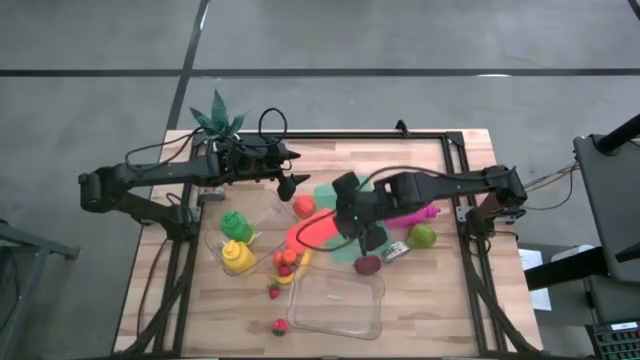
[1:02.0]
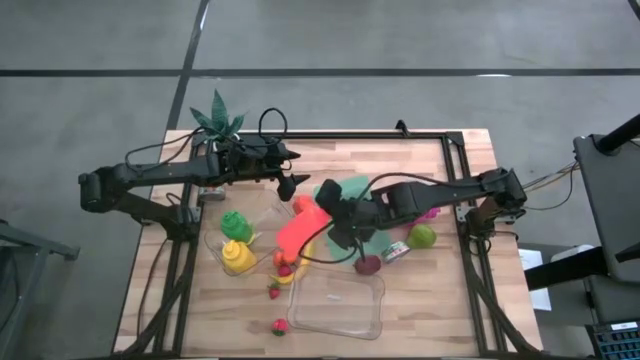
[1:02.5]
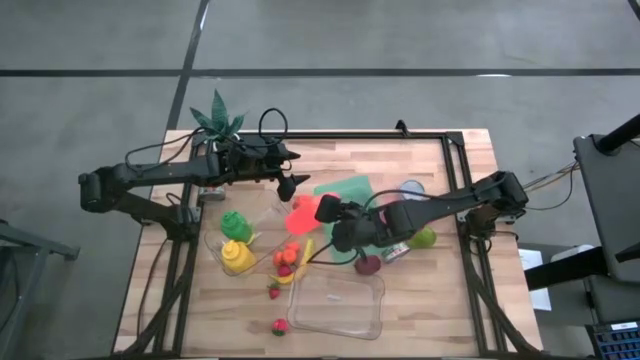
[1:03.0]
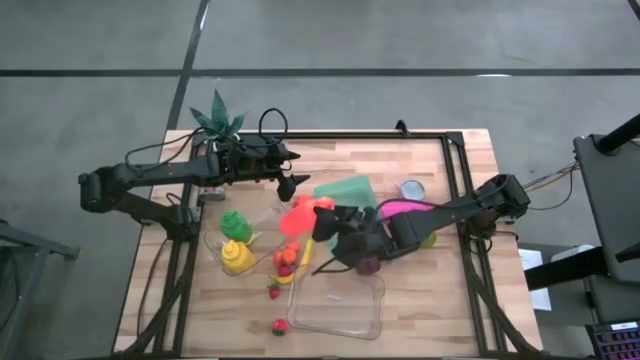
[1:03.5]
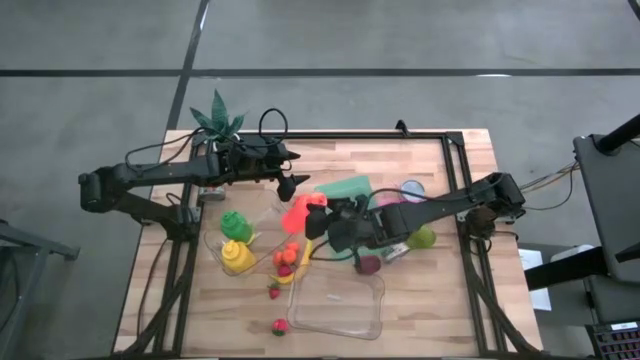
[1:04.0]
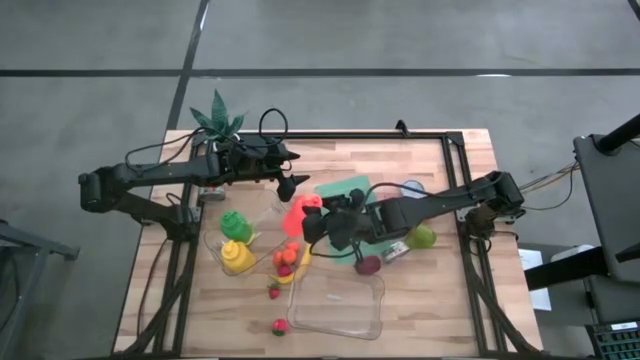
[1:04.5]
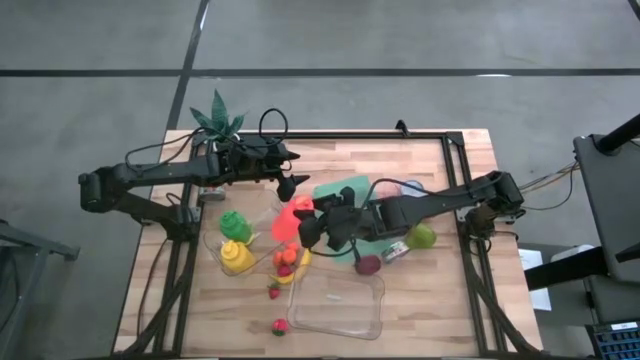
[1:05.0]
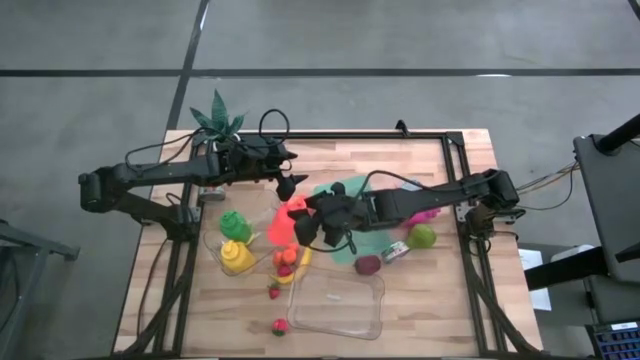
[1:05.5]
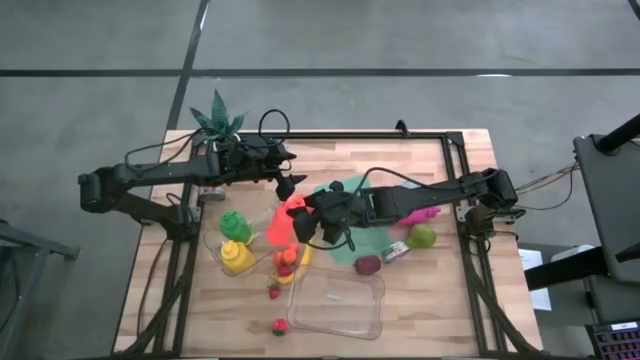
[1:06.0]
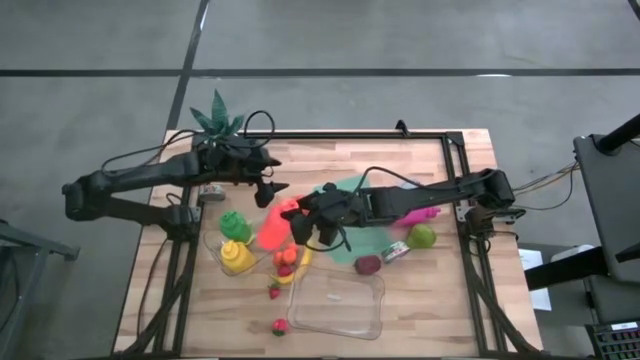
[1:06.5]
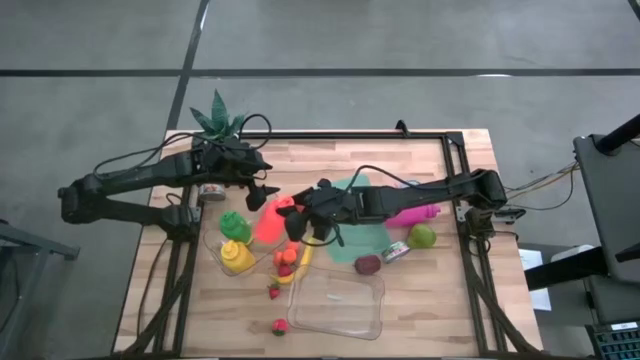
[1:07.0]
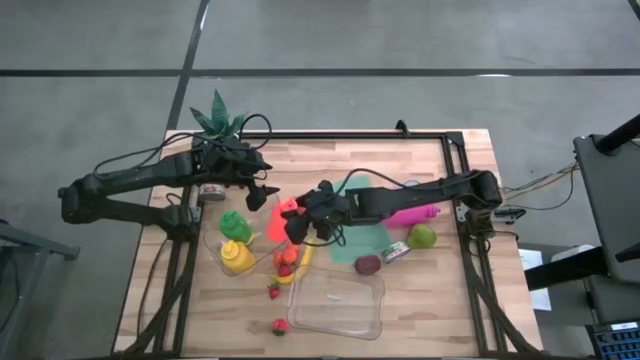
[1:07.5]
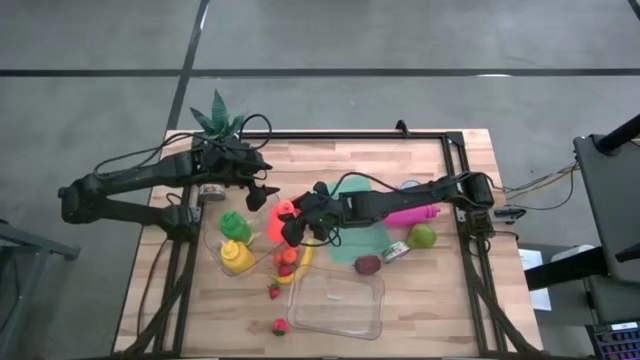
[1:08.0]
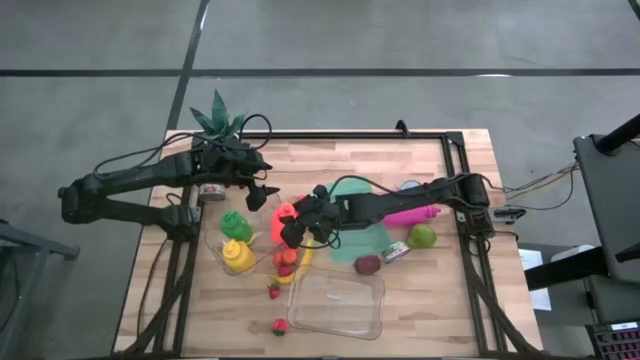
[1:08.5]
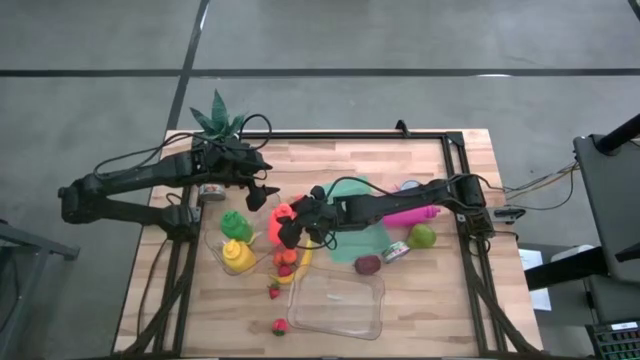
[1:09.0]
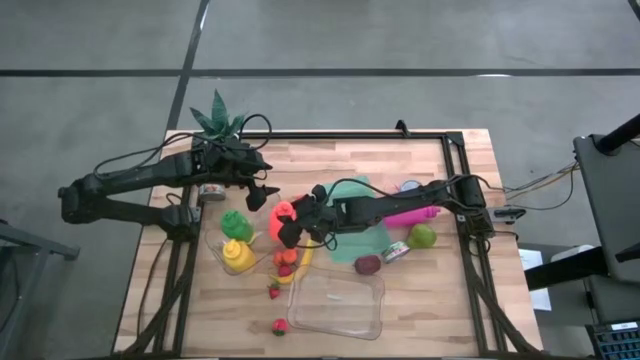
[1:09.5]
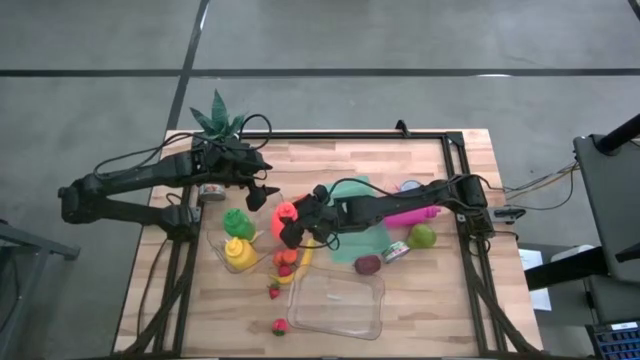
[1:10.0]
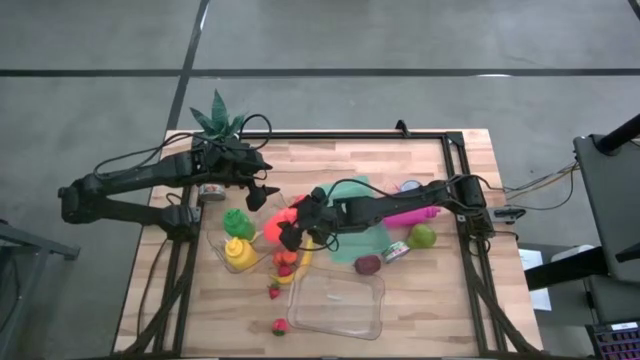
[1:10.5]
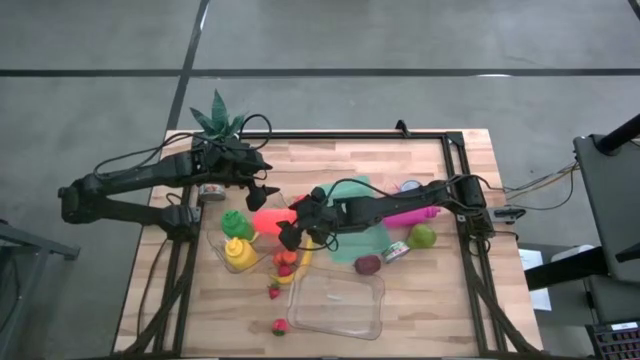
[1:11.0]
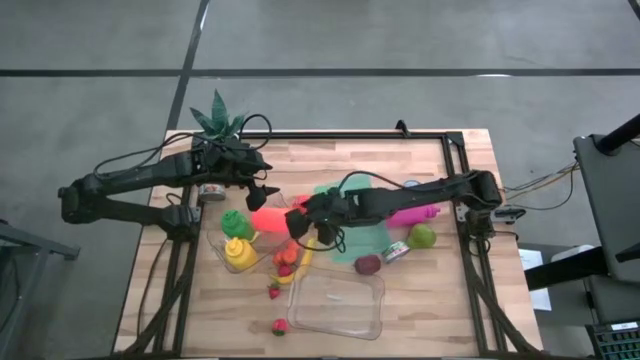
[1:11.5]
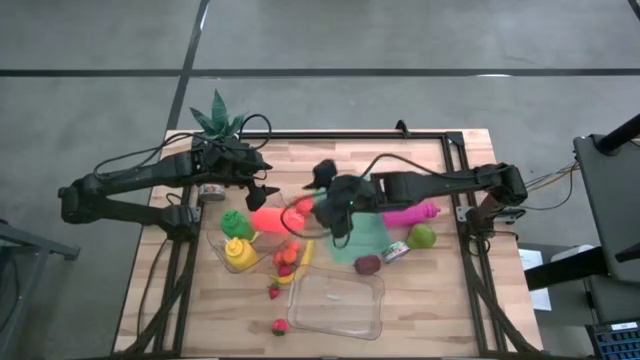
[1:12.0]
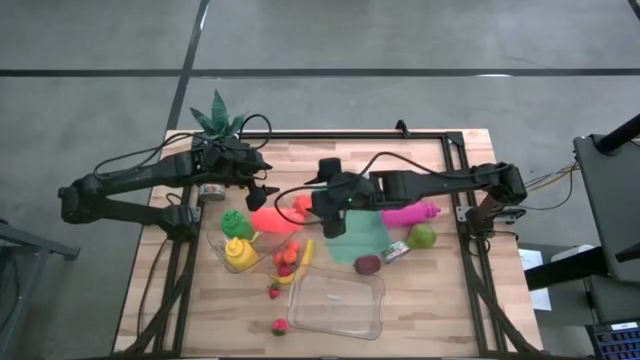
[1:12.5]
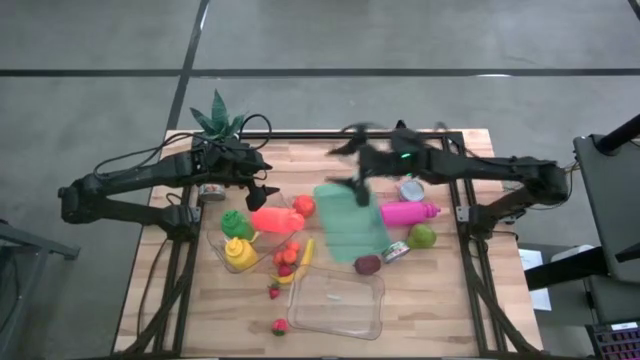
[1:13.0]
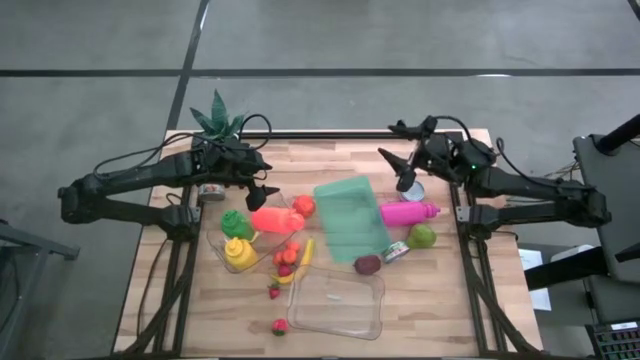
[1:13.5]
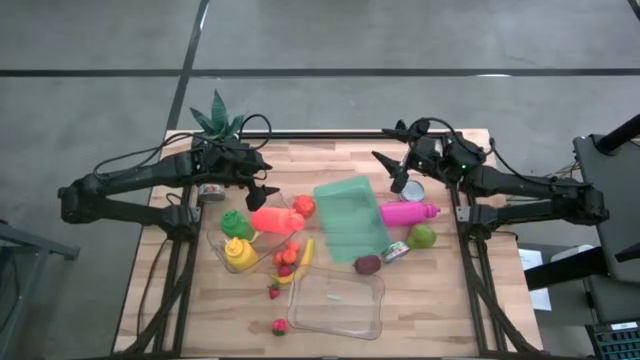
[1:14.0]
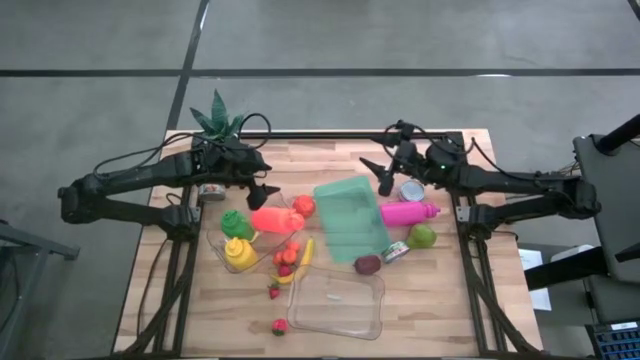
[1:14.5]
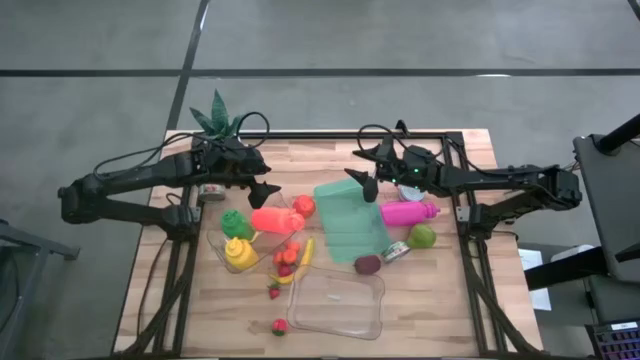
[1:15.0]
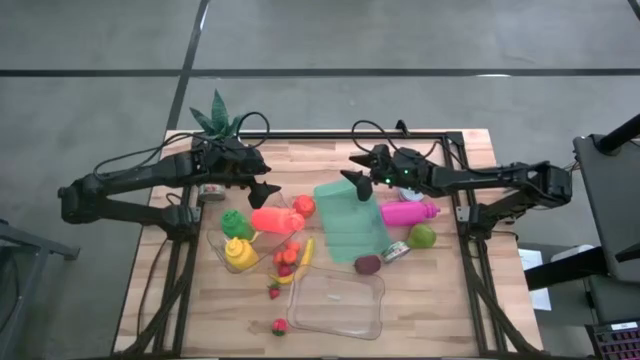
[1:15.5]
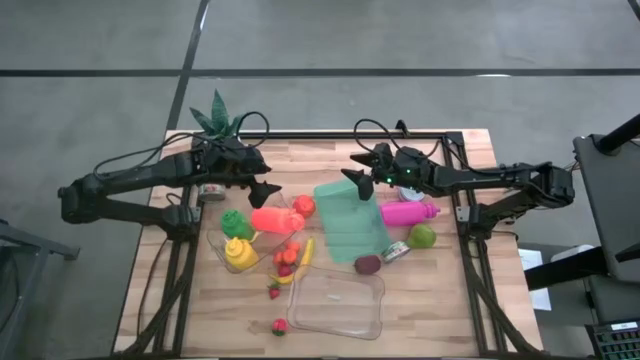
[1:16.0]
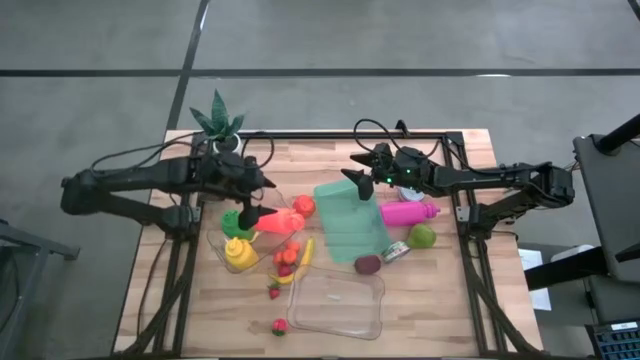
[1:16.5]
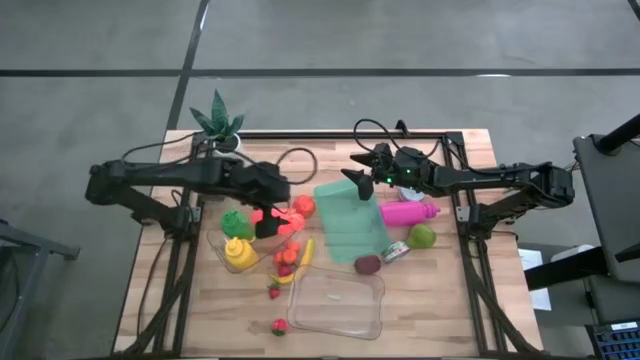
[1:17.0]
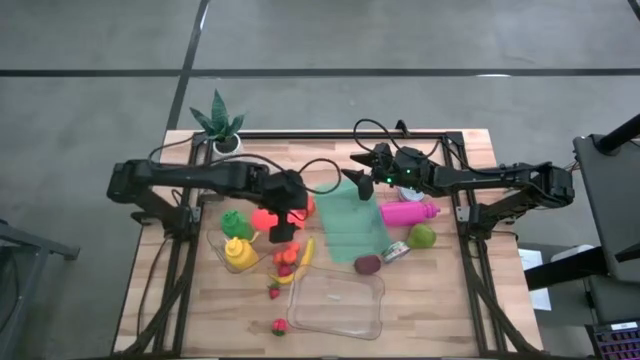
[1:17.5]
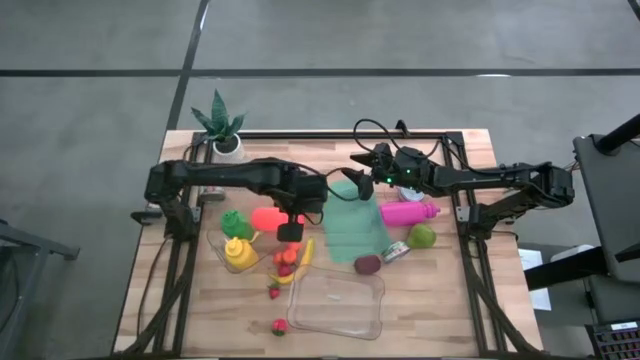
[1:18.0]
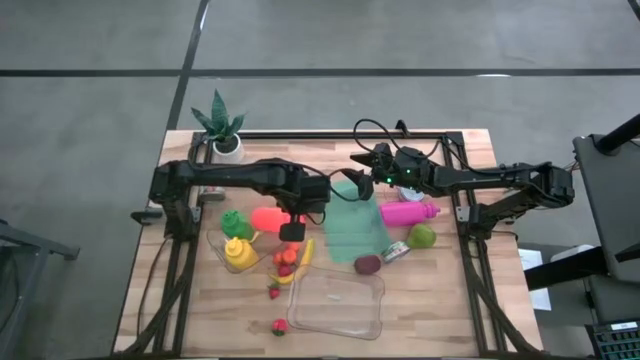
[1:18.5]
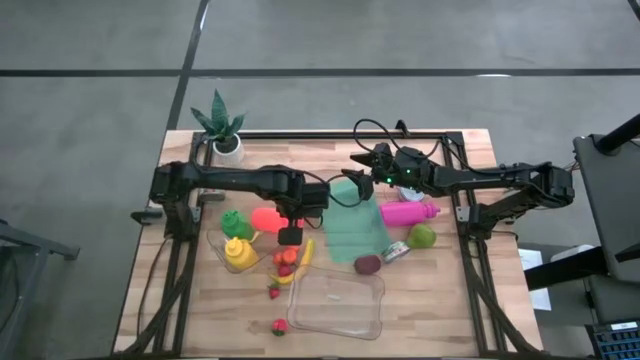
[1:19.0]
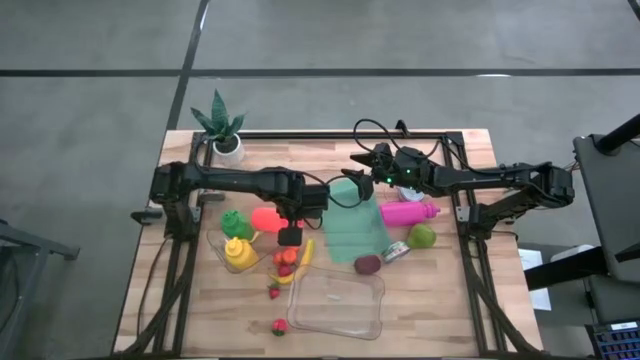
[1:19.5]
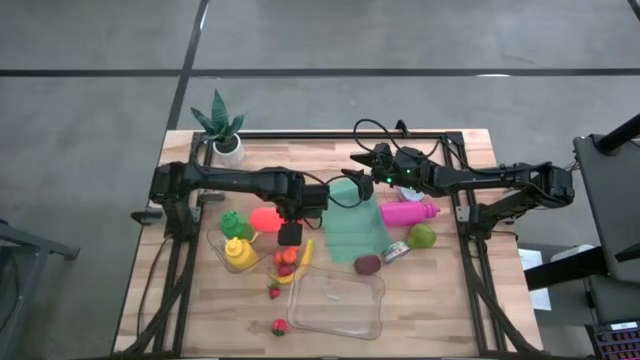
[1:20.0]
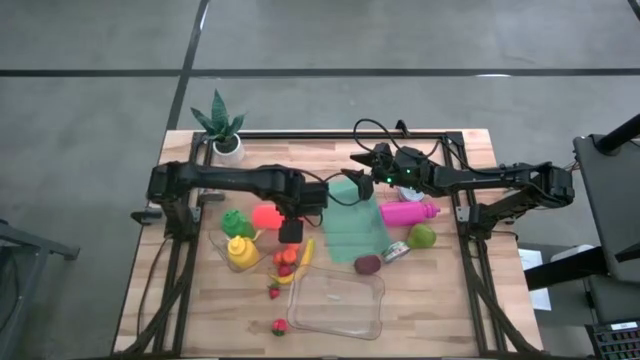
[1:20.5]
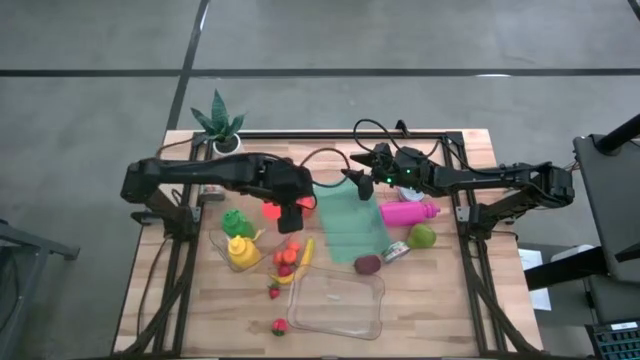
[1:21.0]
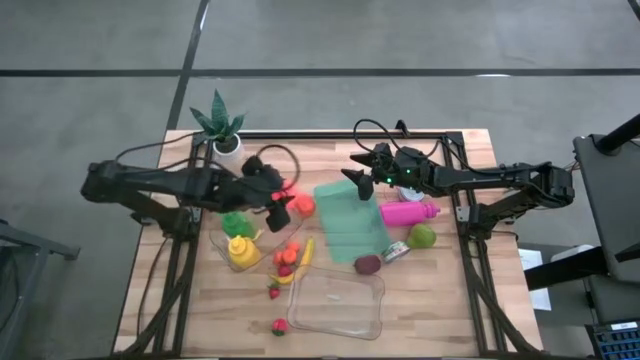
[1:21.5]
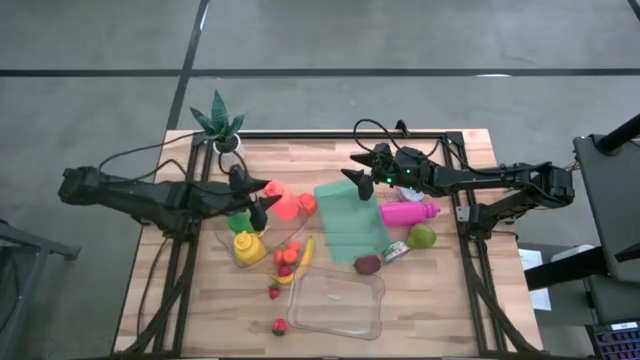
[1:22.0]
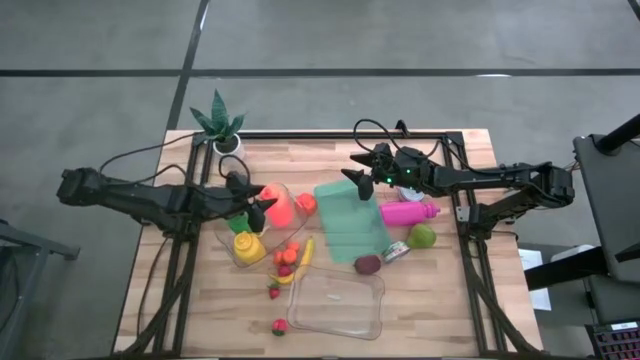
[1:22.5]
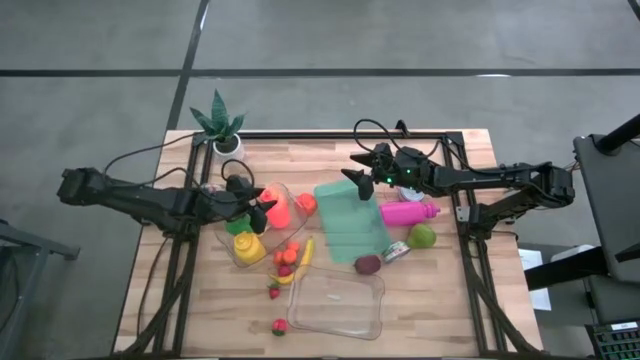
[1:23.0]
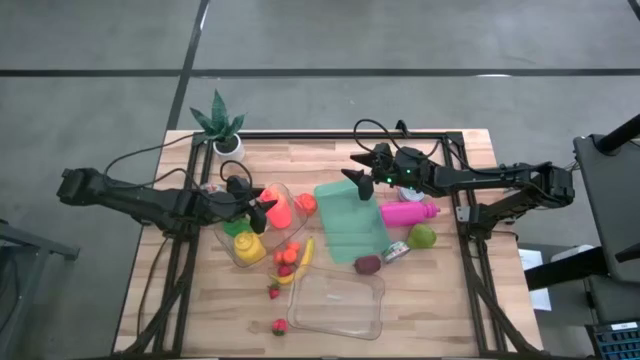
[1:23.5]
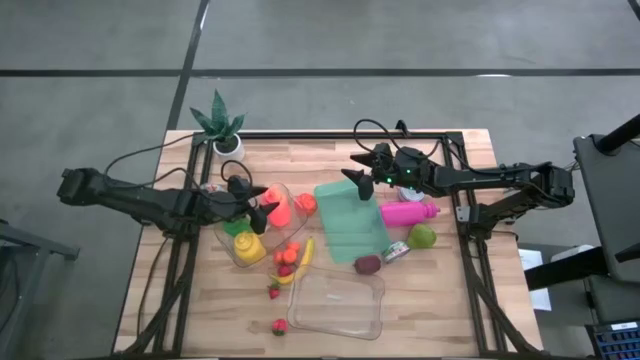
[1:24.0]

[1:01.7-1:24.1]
Task: Pick & Place Food Item
Put the orange water bottle into the top transparent bin
